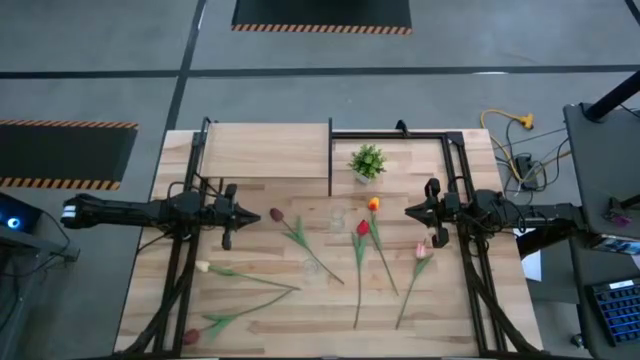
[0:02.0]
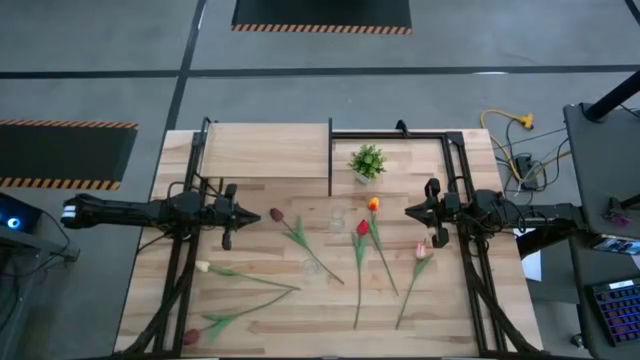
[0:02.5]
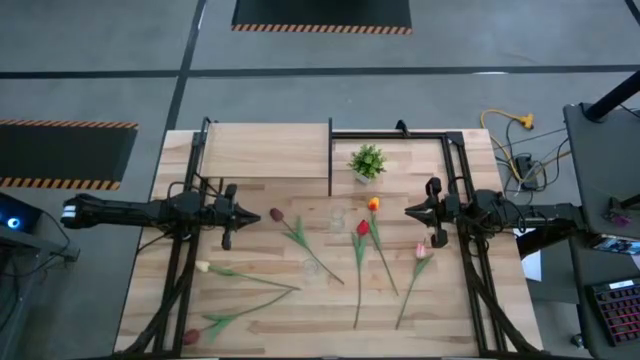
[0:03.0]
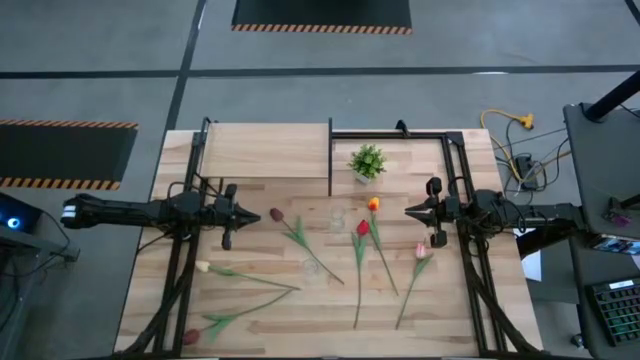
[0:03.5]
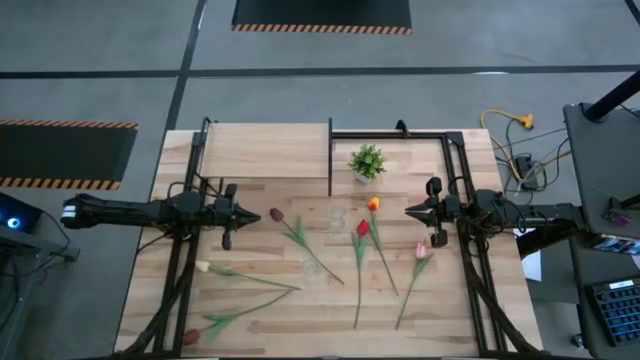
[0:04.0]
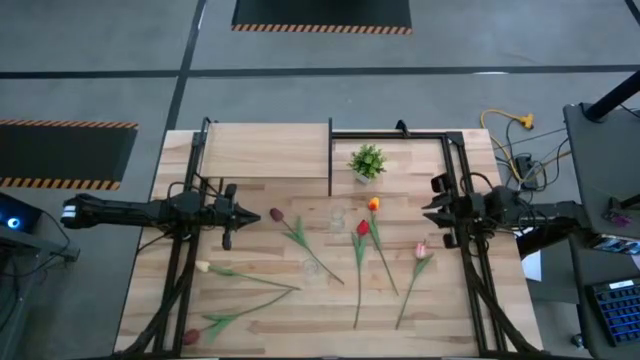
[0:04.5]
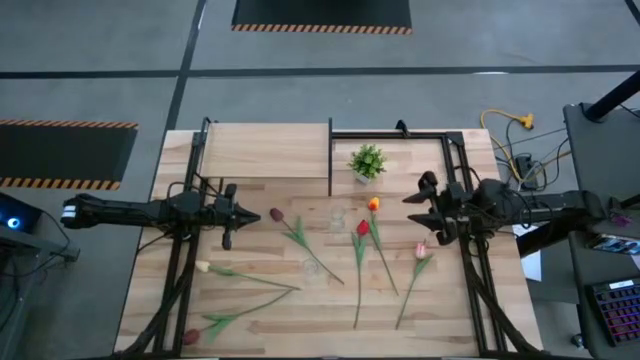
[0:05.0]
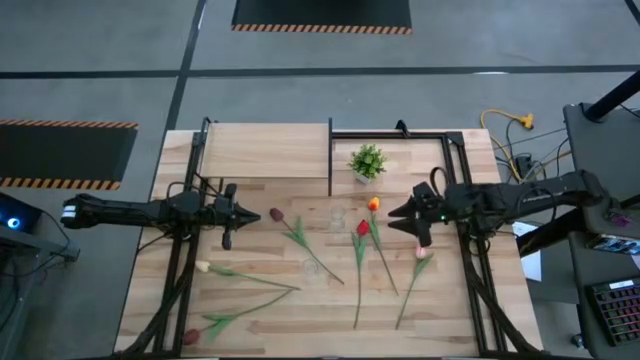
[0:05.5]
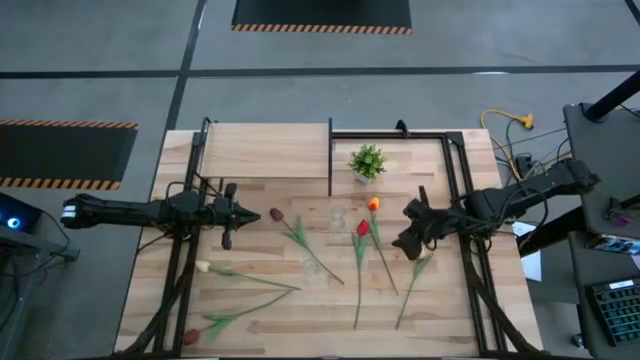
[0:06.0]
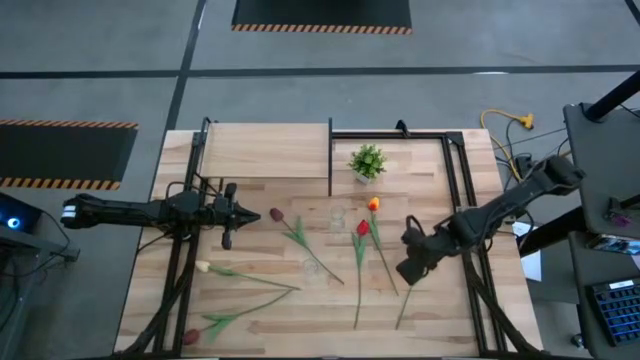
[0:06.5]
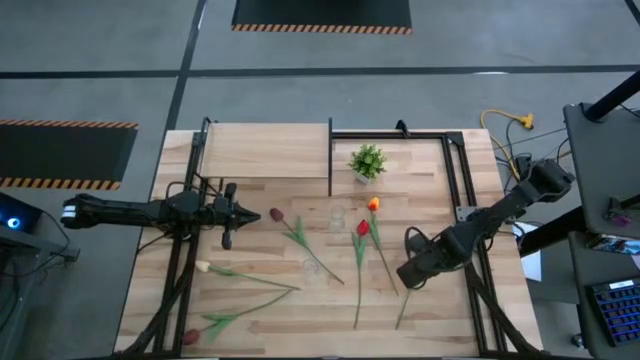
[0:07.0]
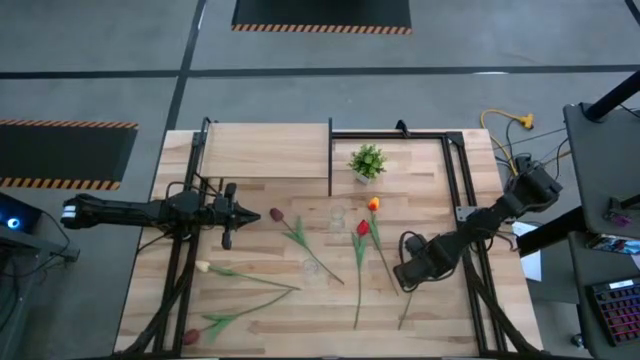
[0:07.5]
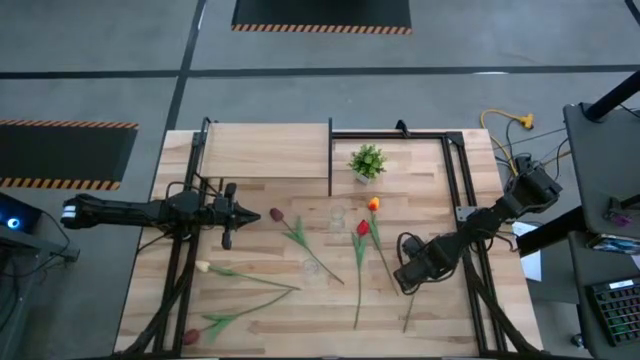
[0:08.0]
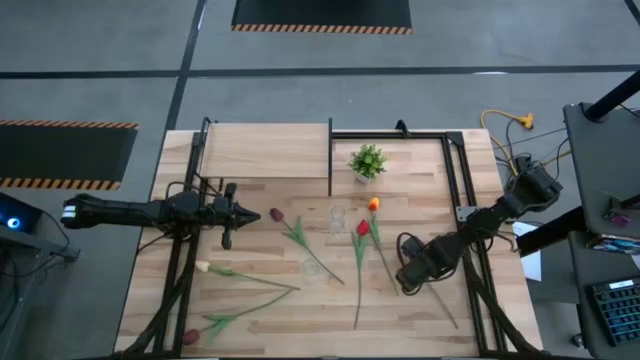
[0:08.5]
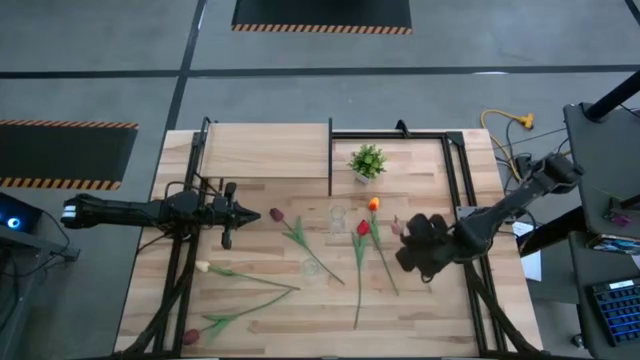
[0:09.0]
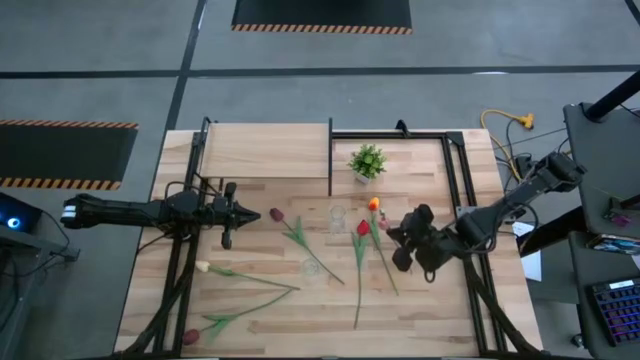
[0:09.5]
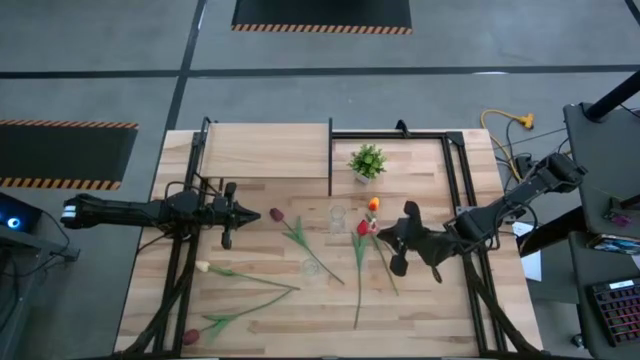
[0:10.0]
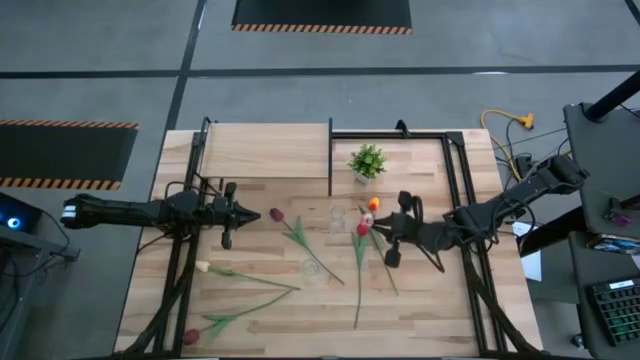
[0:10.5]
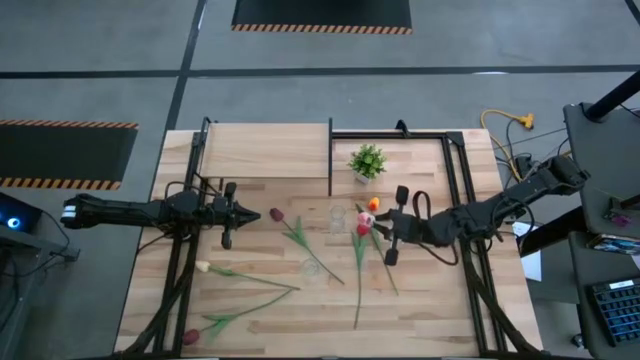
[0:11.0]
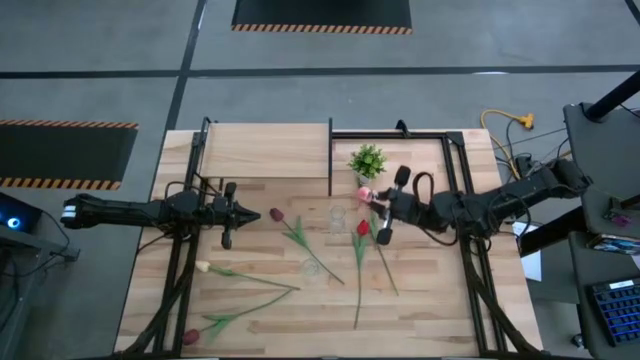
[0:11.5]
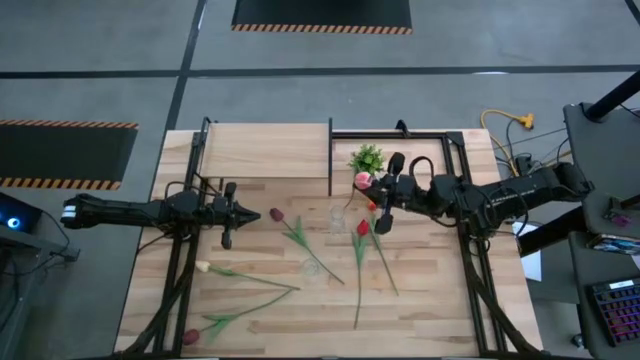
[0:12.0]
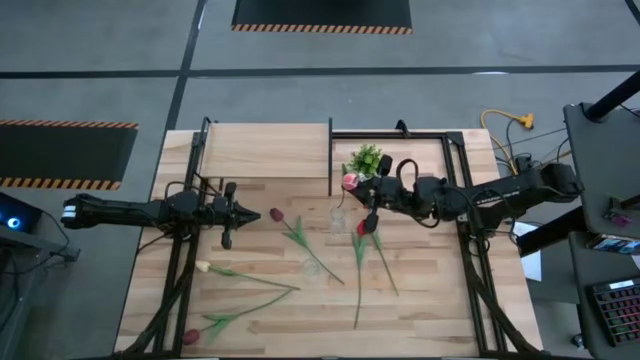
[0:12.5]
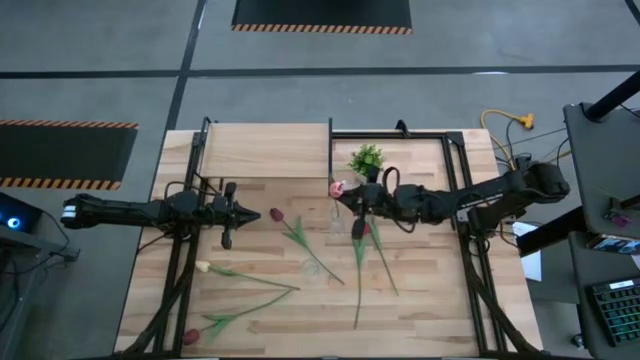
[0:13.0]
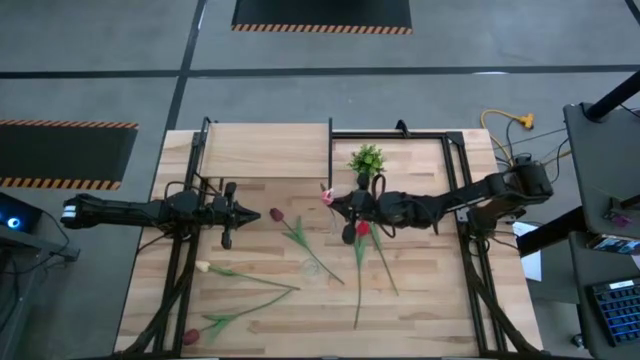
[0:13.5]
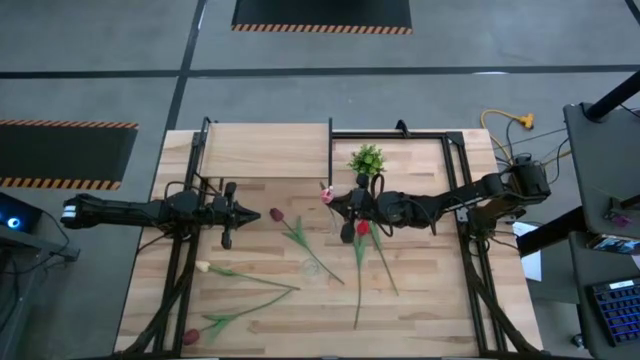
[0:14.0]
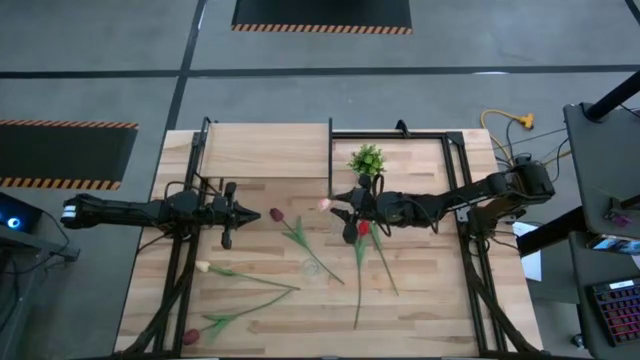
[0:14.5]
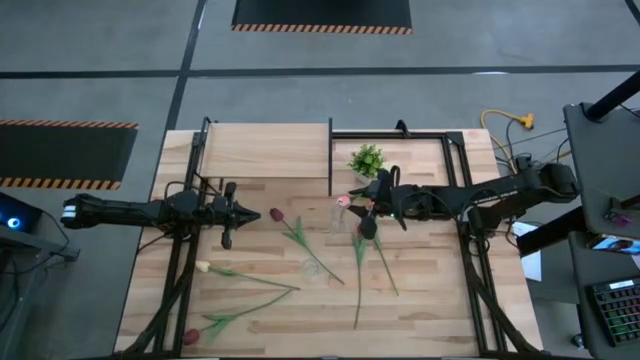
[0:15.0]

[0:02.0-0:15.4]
Task: Pick and place flowers into a vace then onto a shelf
Put the pink tulip into the top transparent flower vase

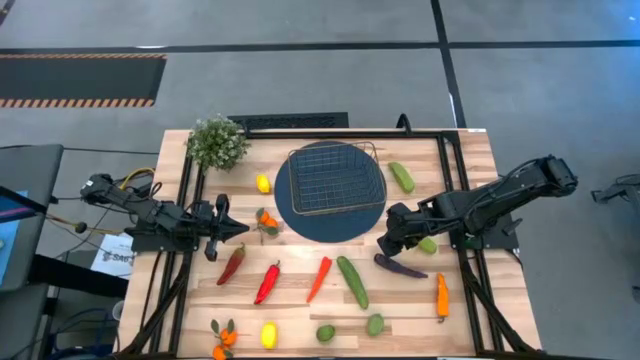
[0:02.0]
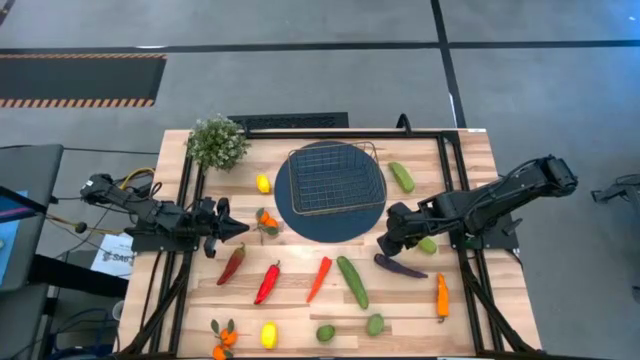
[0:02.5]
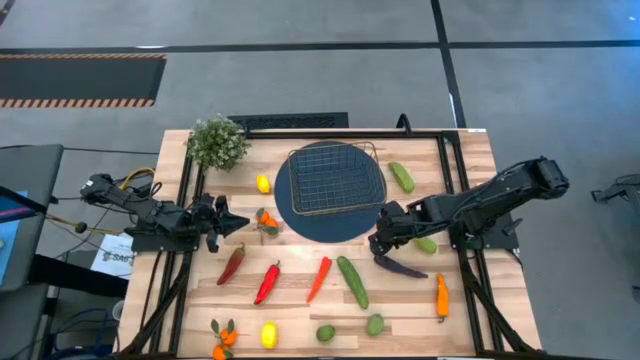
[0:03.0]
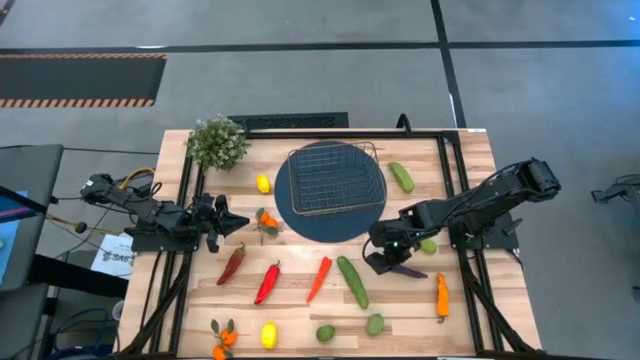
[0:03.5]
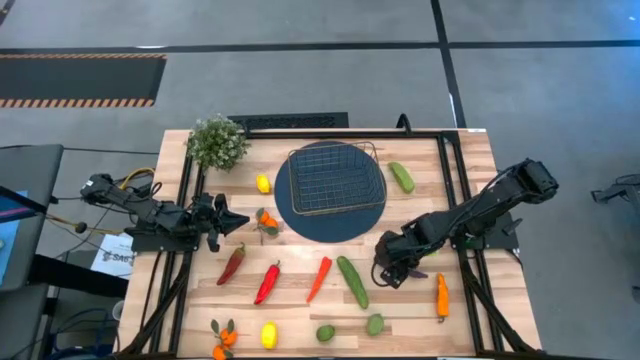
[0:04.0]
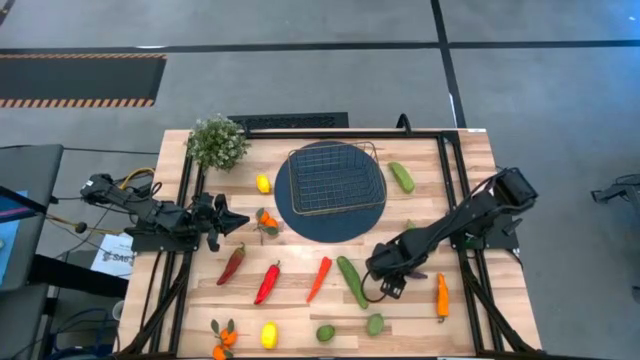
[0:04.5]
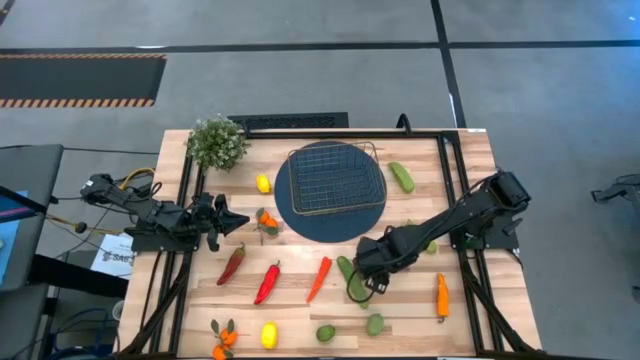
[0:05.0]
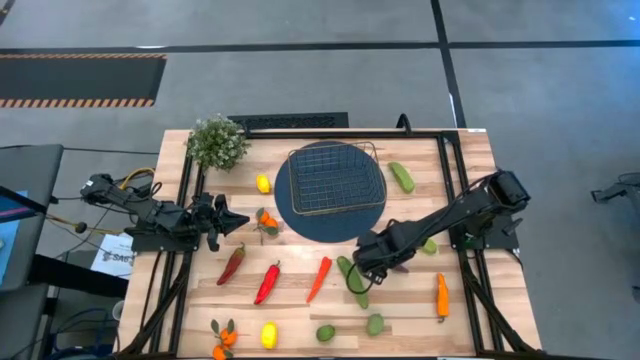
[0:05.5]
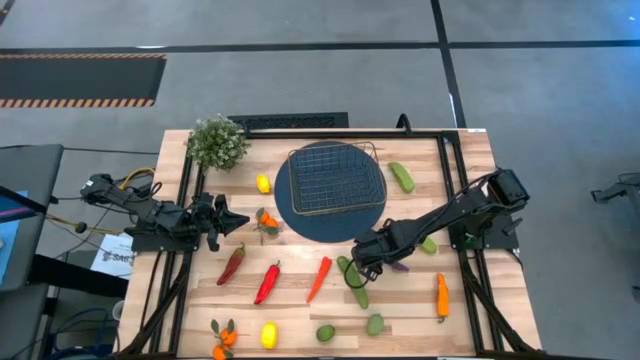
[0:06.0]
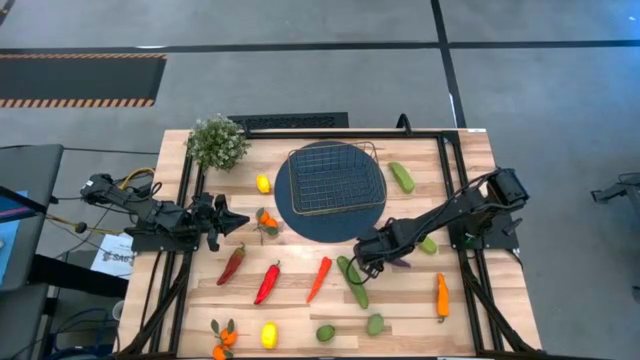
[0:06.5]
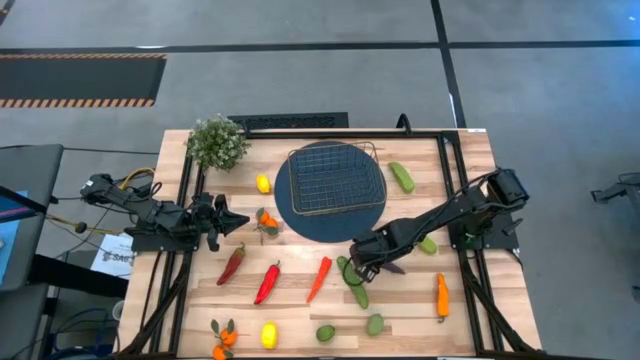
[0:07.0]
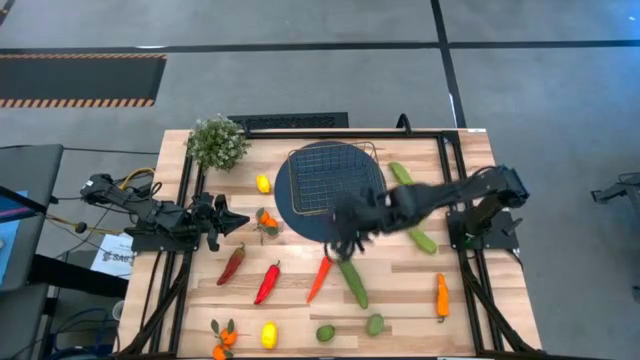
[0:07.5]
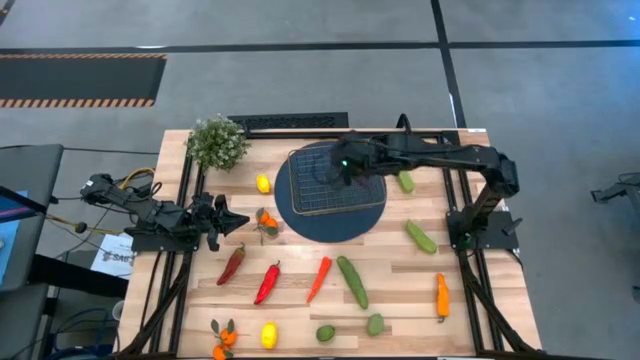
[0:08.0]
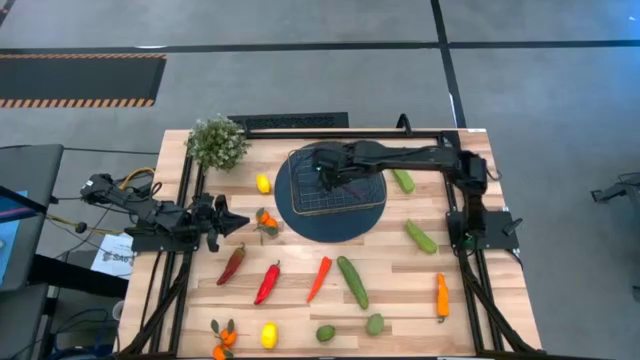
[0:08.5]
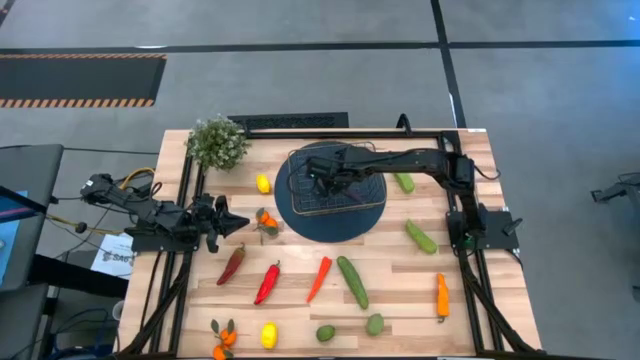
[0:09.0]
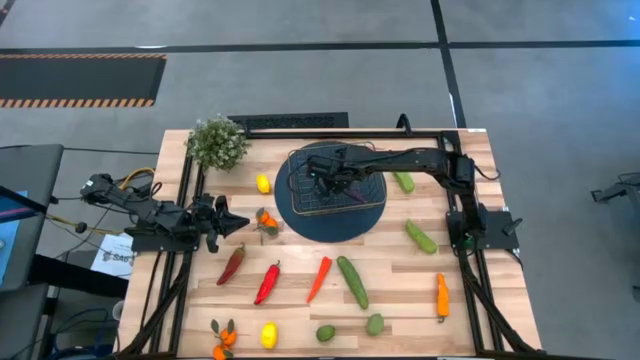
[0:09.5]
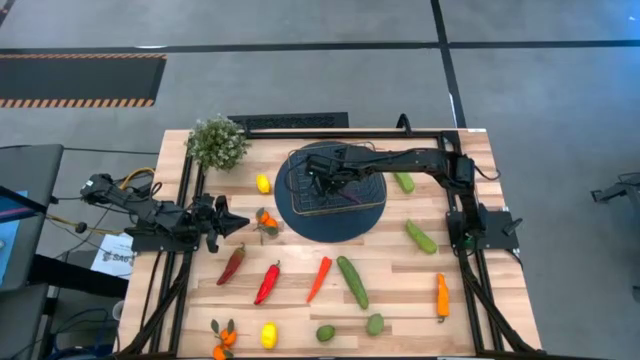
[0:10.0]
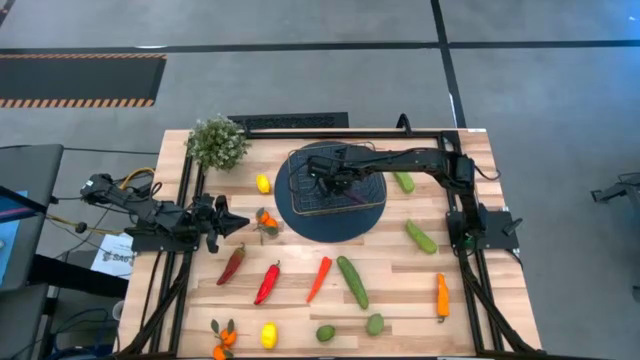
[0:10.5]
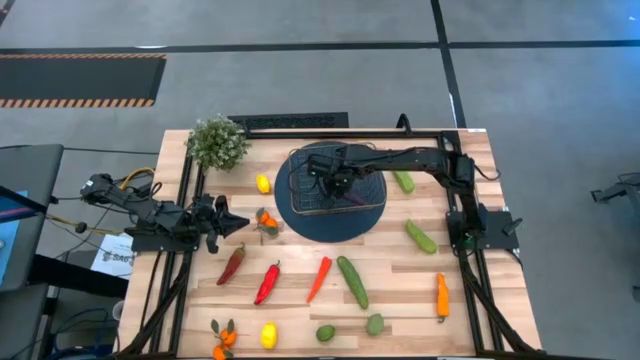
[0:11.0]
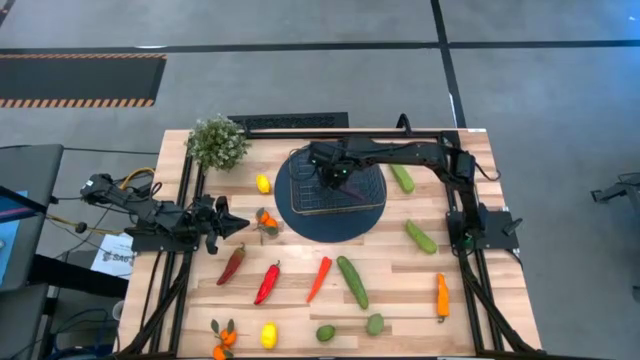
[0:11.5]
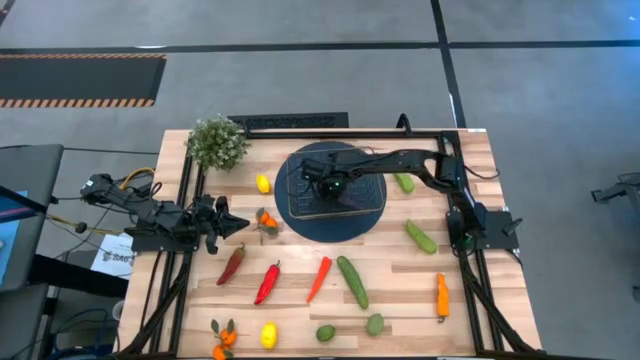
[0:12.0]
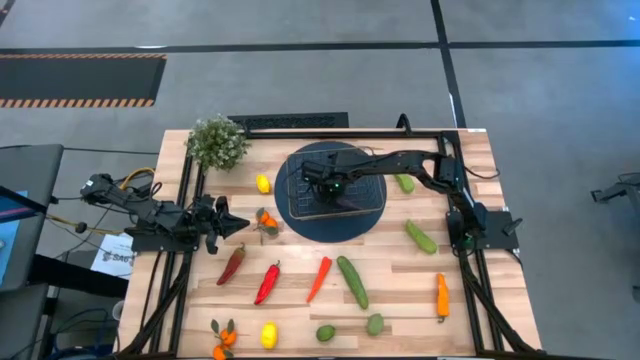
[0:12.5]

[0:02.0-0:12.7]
Task: Build produce basket
Put the eggplant into the basket
